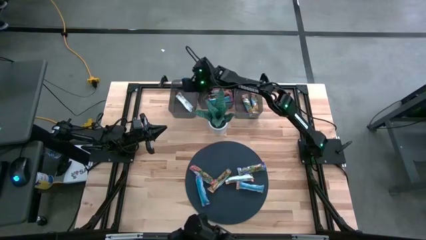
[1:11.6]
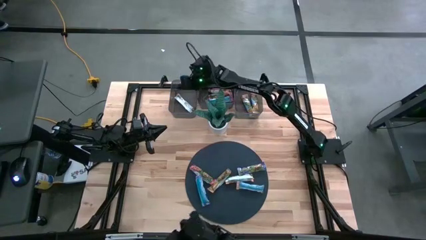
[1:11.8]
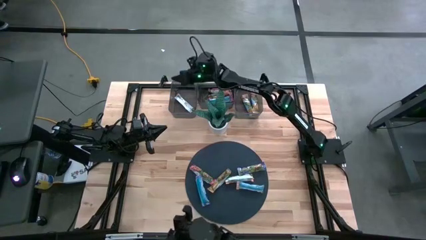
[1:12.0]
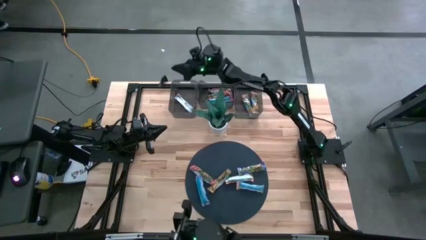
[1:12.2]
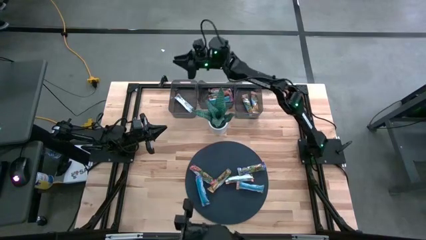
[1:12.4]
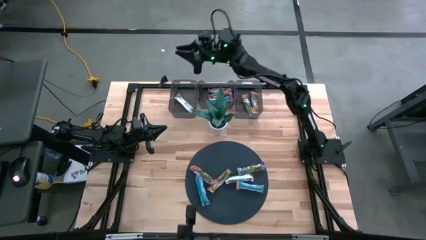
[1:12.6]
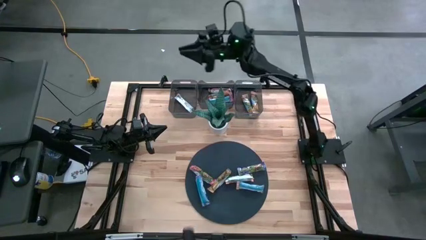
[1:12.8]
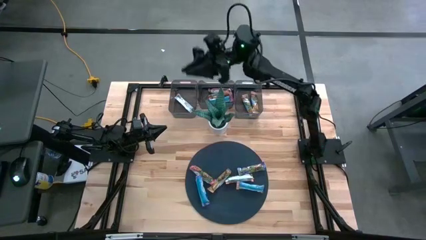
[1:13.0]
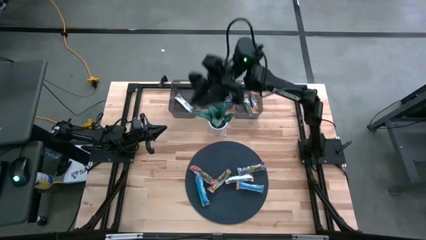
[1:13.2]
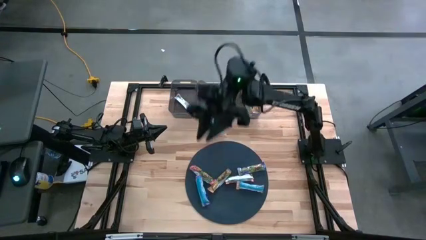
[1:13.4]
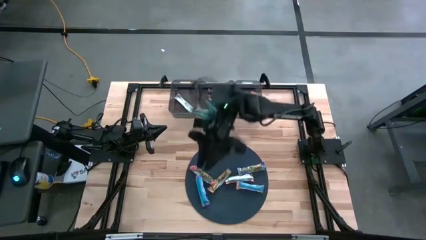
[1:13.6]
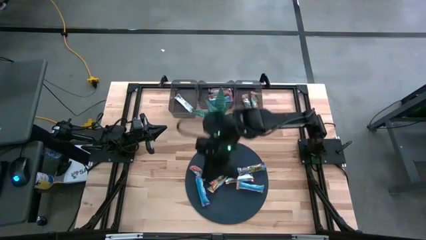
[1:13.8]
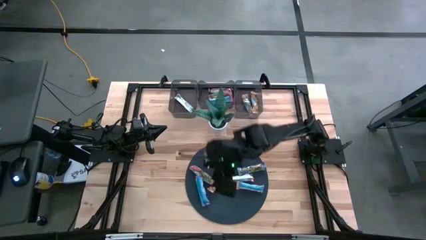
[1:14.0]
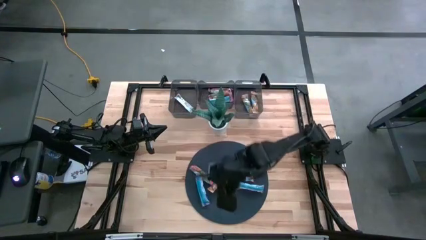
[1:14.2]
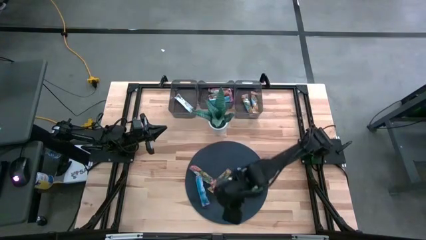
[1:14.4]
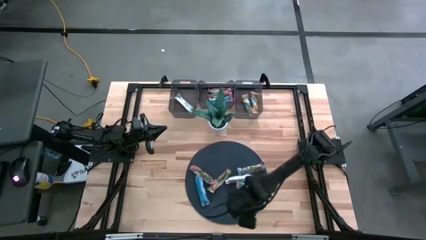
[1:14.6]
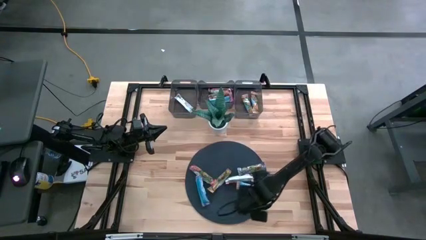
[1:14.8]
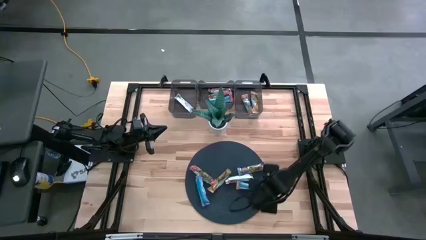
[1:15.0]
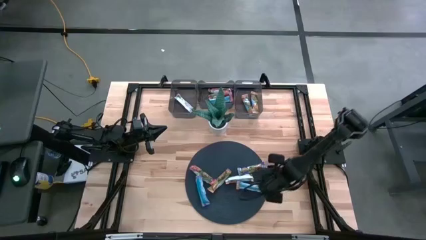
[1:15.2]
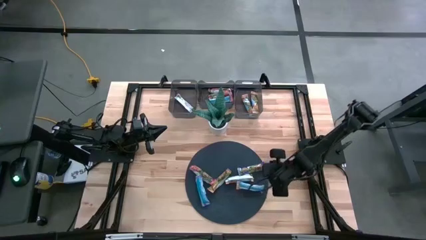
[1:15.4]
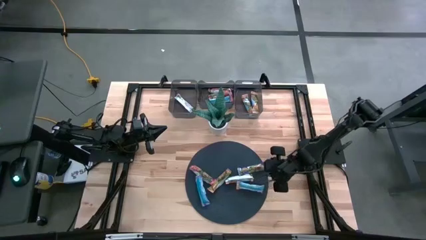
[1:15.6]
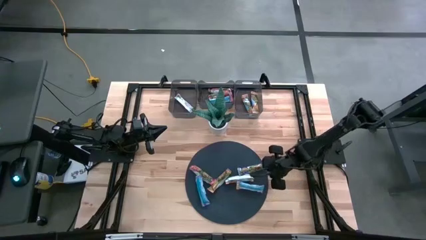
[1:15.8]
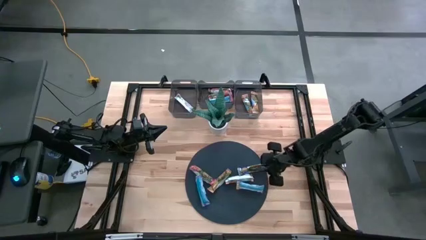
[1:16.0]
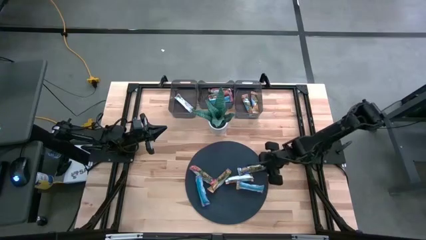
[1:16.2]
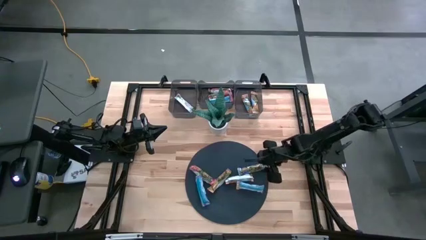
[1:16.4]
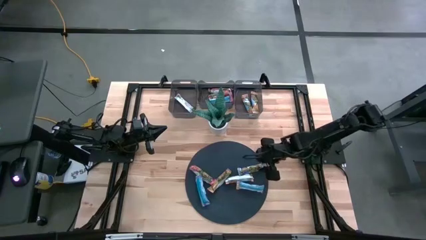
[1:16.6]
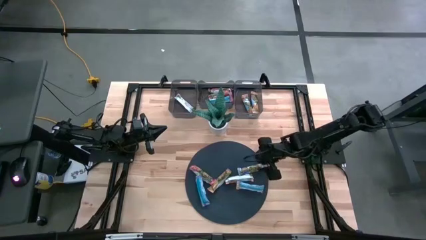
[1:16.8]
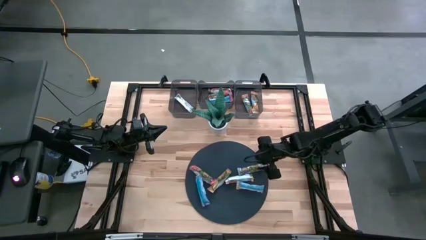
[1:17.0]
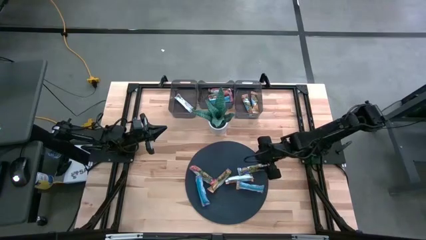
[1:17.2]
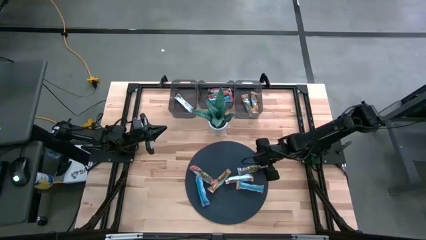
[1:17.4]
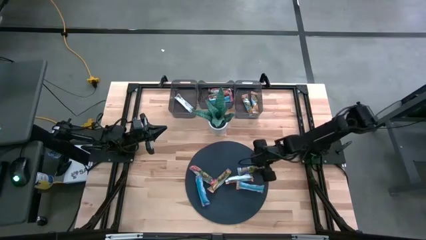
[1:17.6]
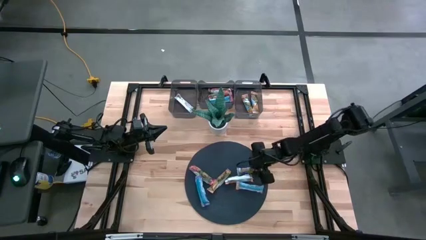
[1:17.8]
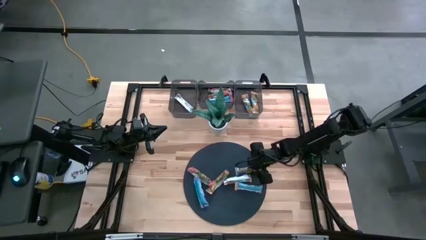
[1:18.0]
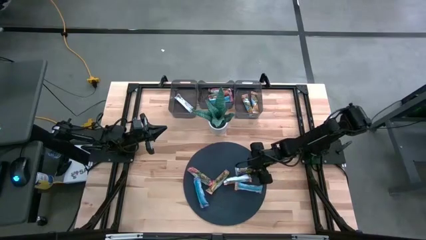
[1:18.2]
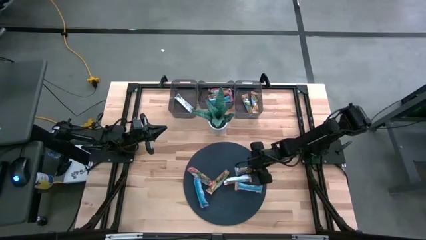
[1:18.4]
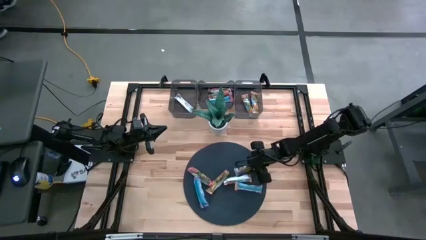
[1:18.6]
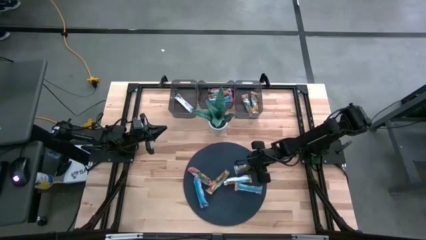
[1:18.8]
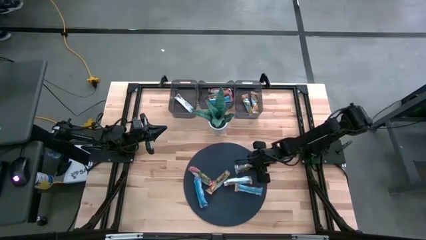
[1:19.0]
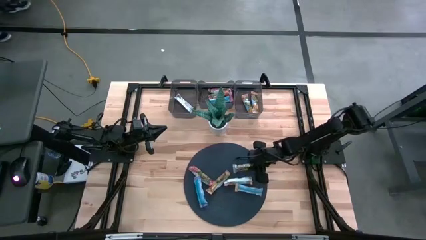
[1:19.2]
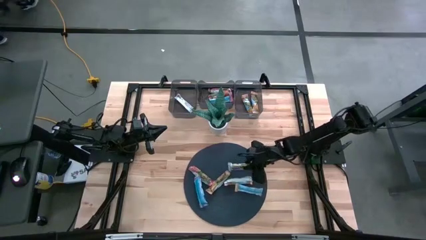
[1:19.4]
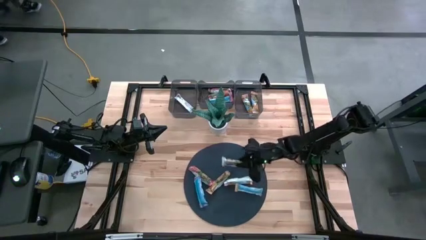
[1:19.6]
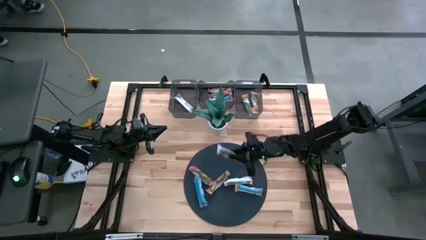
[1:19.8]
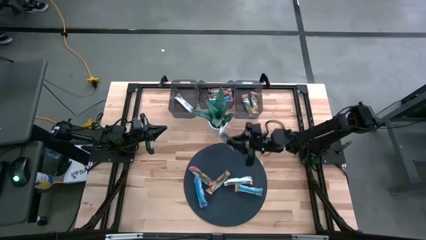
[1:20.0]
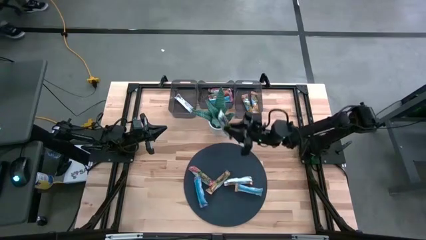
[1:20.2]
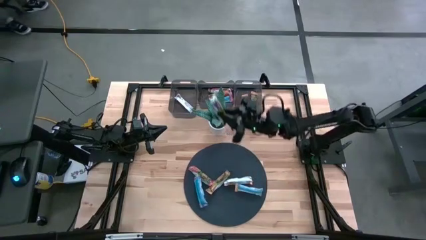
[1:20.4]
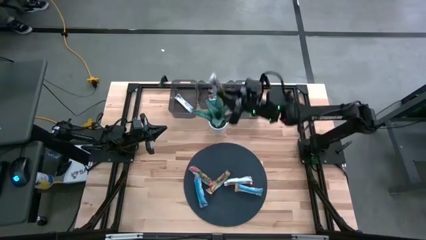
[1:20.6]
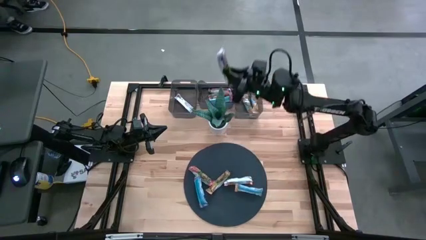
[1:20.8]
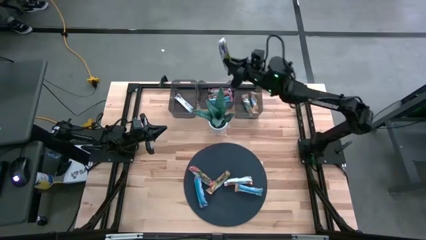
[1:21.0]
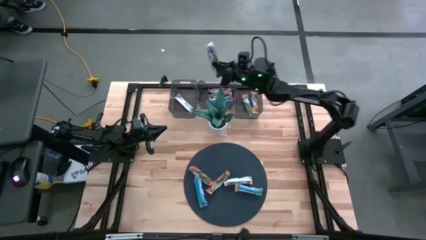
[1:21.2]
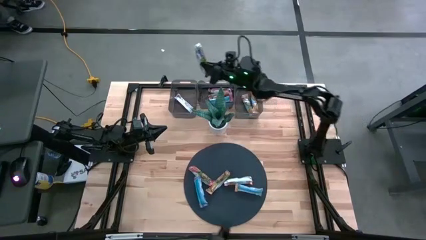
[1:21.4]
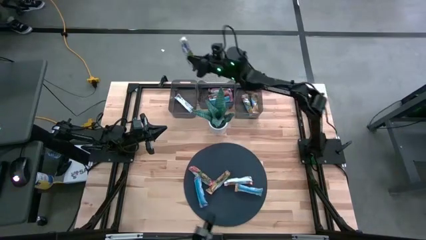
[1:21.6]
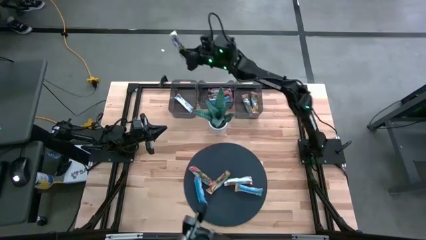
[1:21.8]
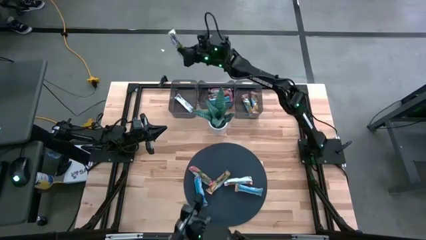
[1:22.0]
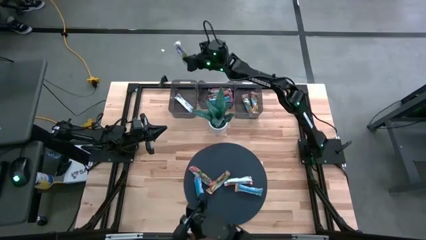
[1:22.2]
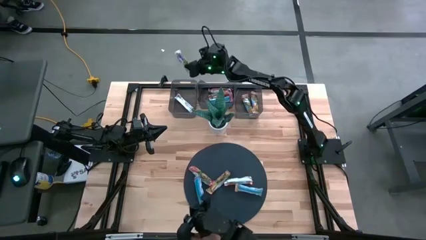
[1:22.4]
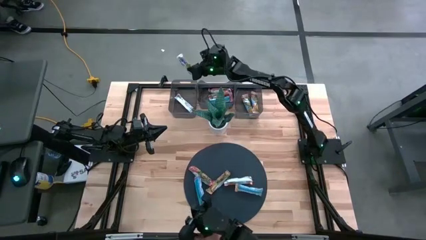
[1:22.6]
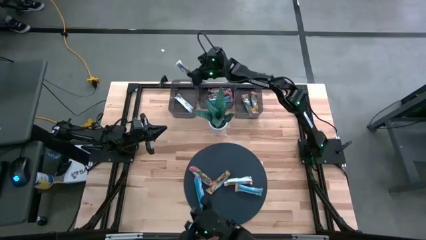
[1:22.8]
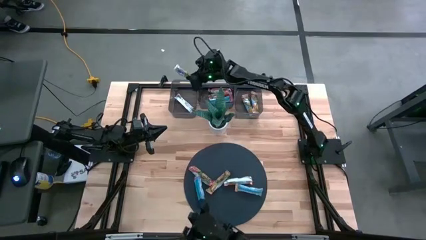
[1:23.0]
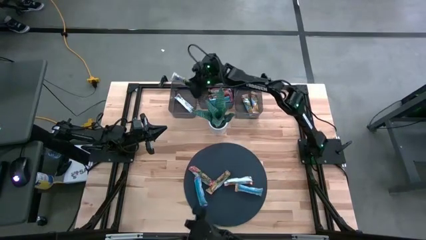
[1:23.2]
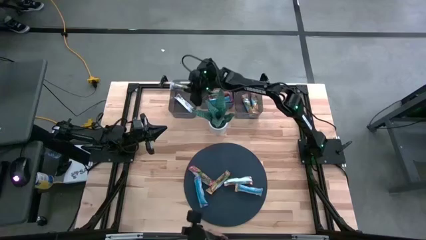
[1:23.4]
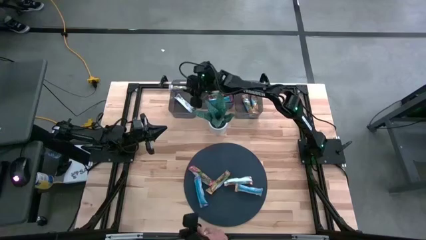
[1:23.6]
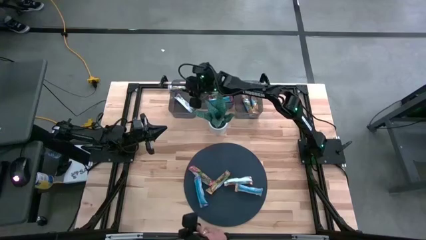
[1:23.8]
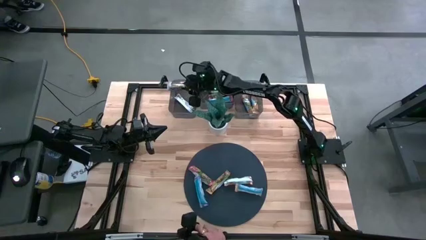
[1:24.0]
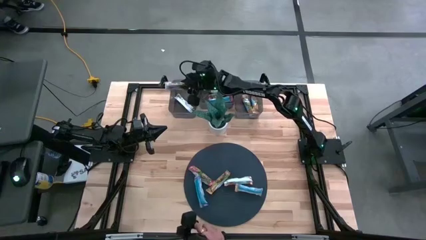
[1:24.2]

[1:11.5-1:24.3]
Task: Pick and place Granola Bars by type
Put the blue granola bar into the left black bin

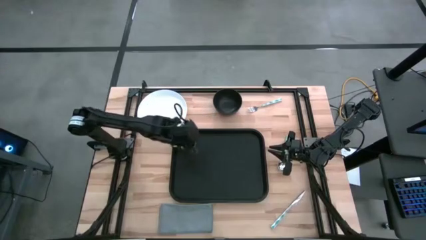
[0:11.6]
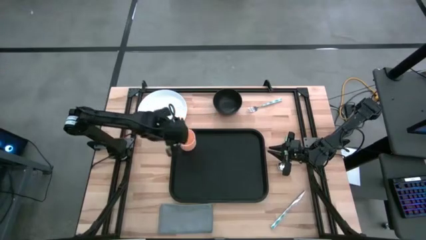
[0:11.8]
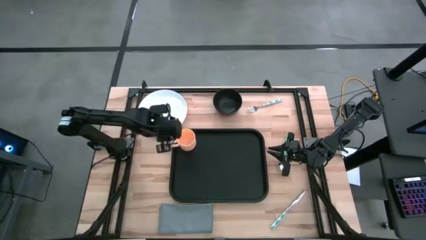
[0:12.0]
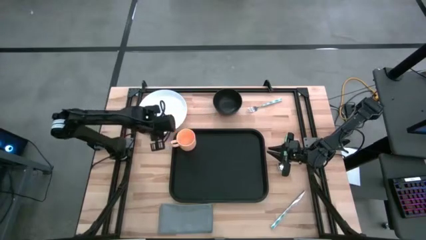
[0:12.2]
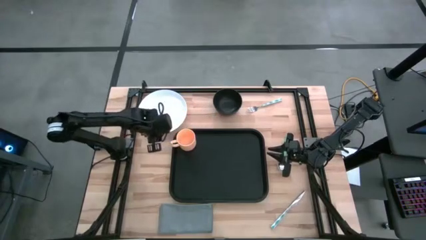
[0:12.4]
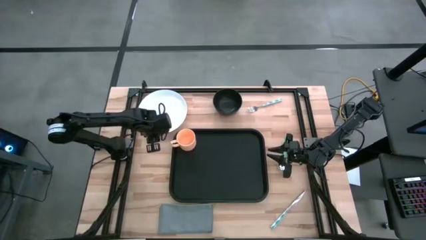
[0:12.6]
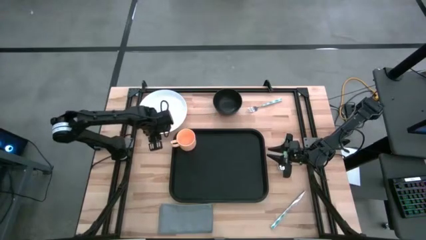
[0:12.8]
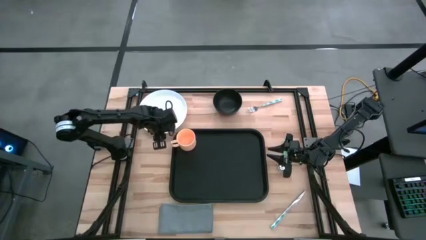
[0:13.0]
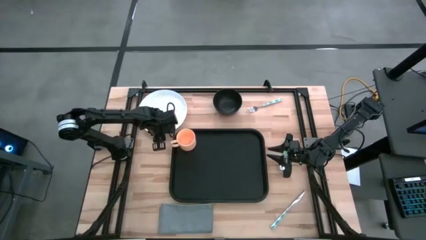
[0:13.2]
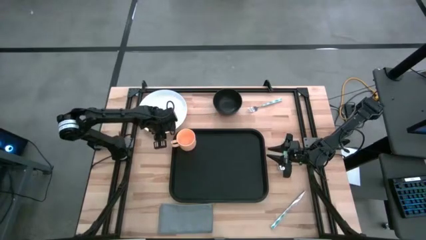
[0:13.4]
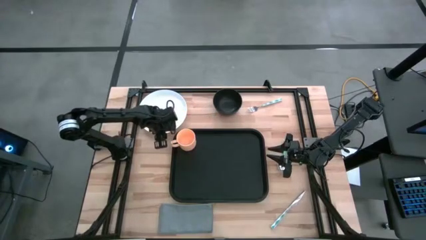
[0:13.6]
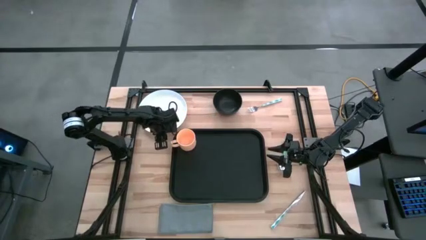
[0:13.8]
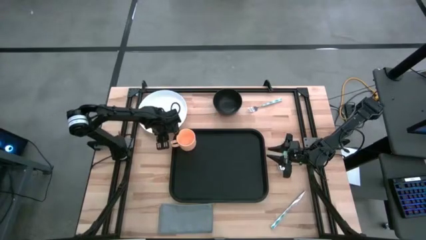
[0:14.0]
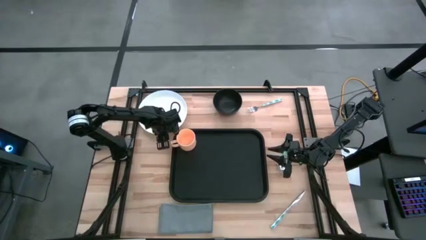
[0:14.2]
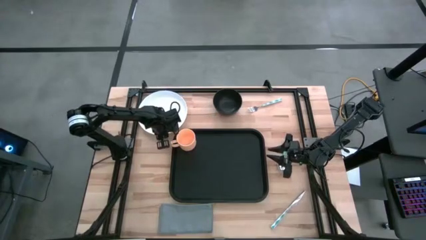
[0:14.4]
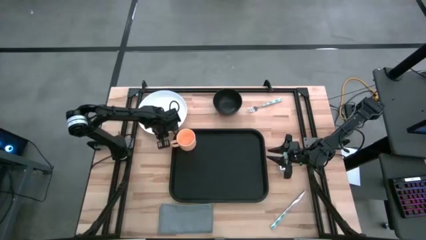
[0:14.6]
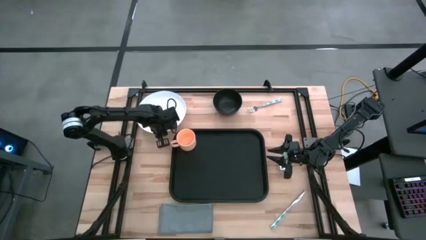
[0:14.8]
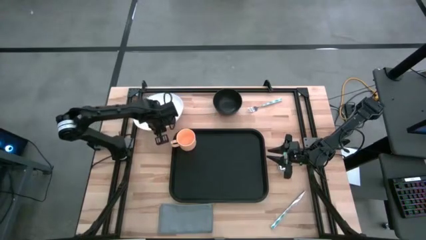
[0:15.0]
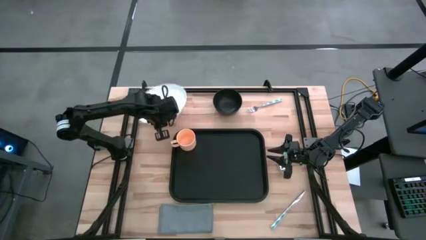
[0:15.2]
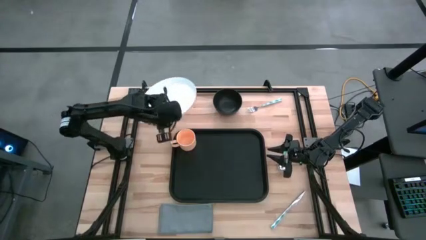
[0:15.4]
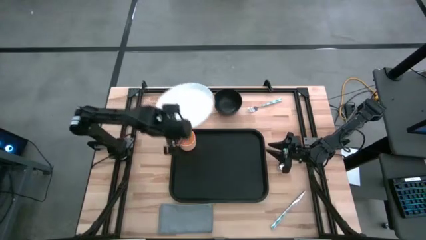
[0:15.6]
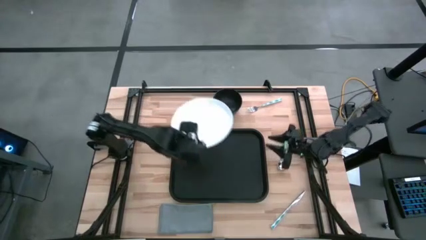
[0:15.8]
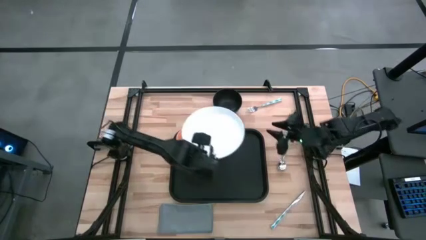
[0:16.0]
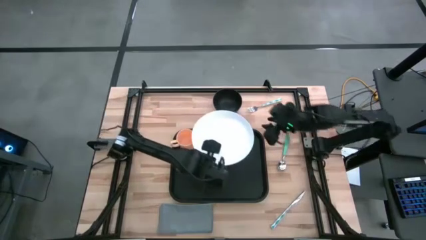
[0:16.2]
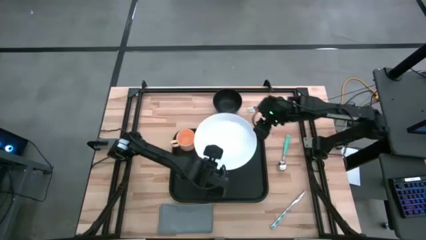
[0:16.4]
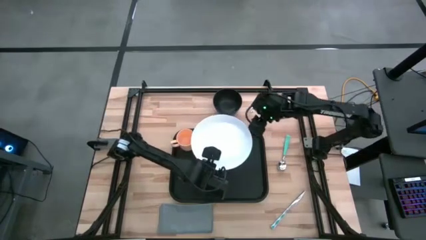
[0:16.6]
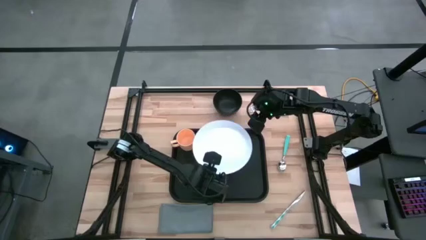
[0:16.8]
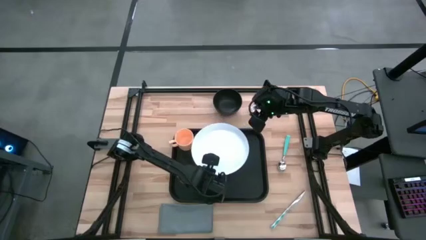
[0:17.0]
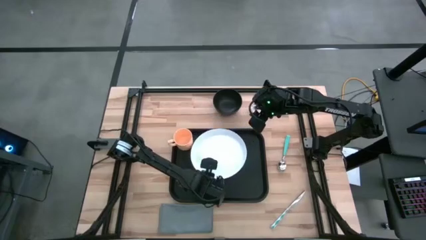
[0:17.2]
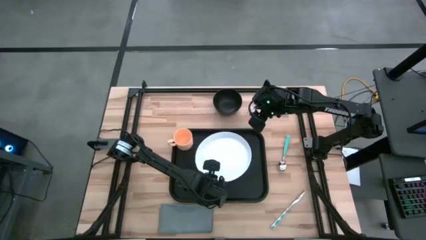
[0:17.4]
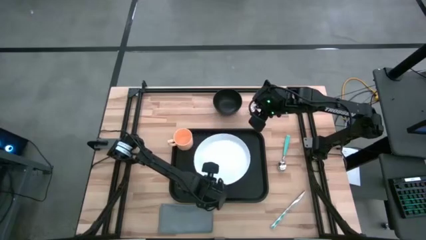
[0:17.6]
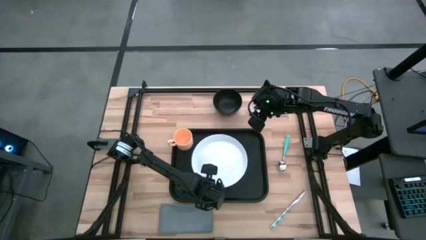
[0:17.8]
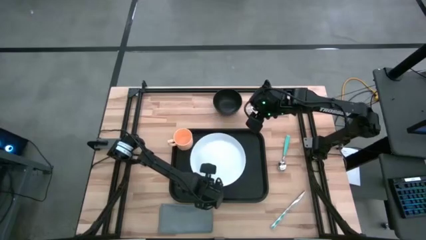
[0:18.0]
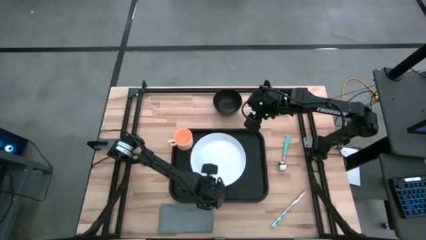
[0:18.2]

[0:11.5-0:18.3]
Task: Set up tray
Put the white plate in the center of the black serving tray
